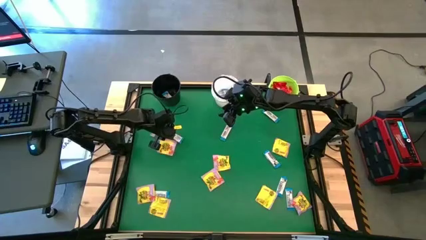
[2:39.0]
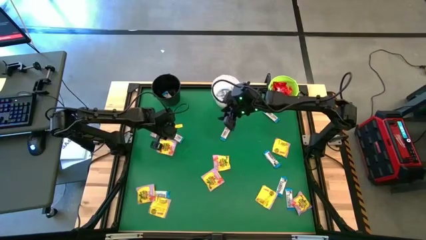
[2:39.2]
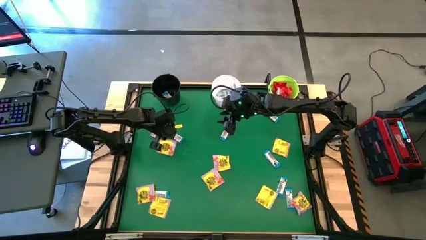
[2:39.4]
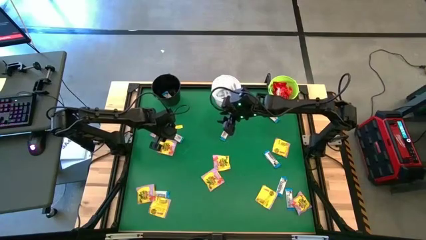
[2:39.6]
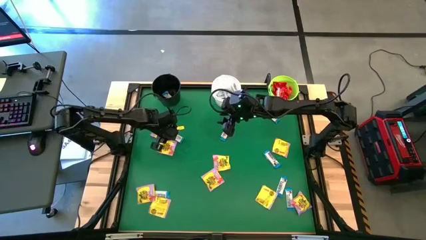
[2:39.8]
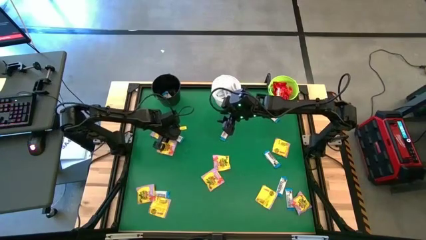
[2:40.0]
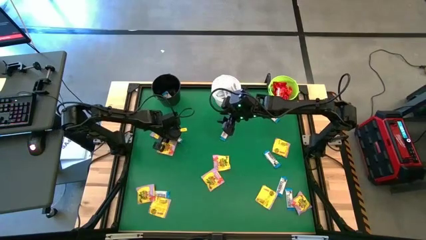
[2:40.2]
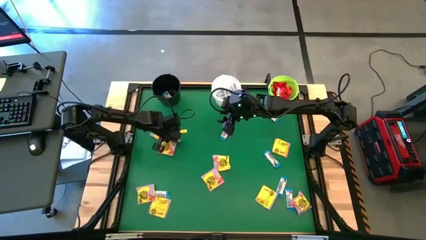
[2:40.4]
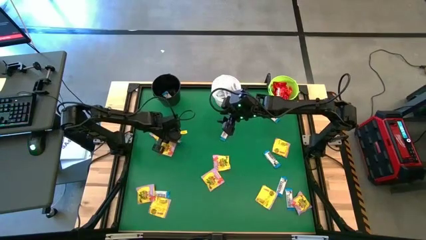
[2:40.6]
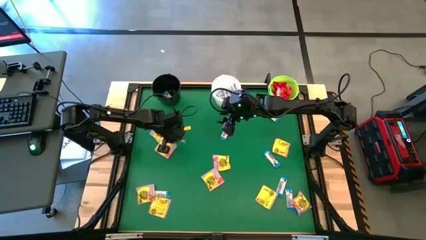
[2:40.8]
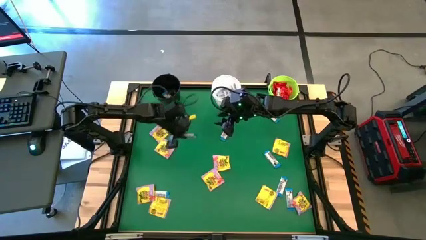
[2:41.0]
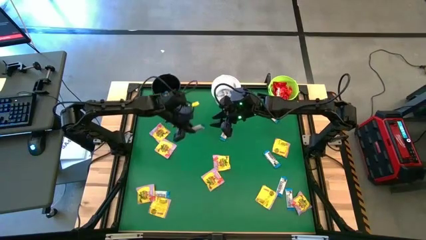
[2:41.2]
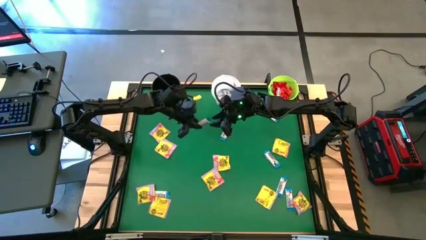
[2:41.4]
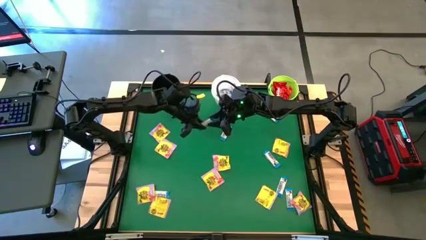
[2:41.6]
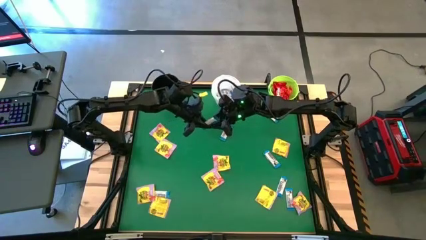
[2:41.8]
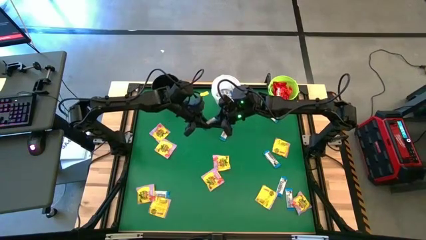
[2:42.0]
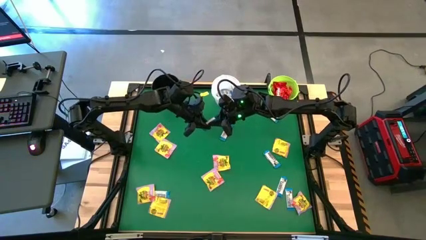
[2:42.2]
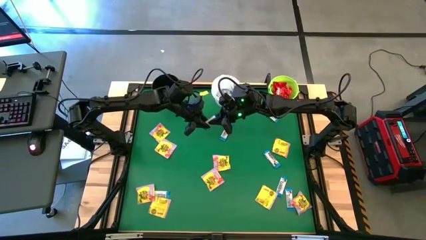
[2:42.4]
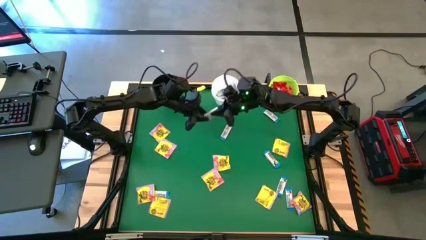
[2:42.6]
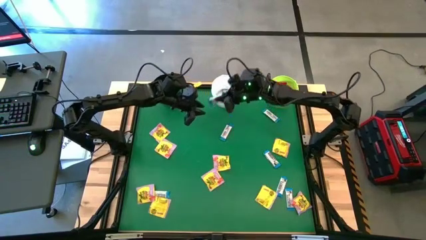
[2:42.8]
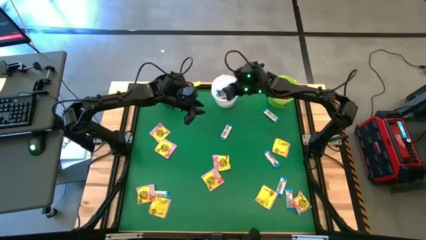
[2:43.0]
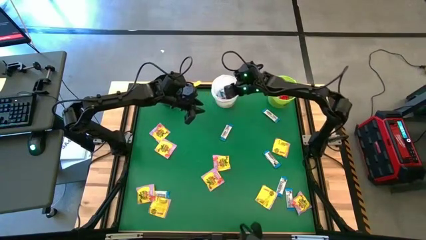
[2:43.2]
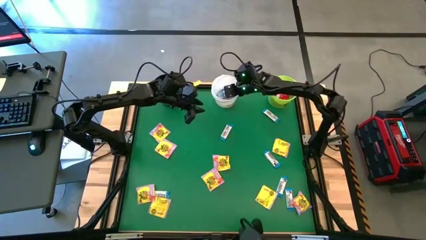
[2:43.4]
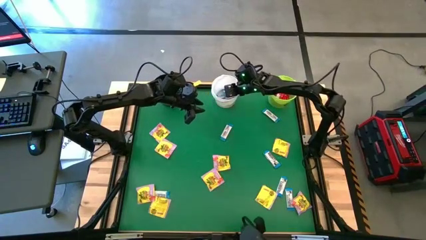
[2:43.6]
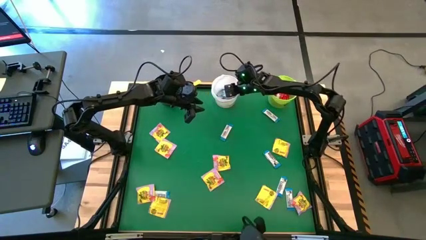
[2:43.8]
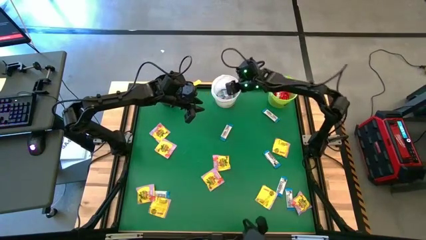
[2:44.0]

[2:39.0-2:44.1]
Task: Sort candy by brand, put in halloween buckets
Put the white candy into the white bucket

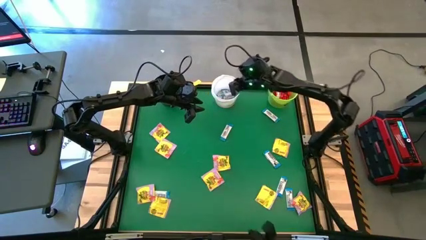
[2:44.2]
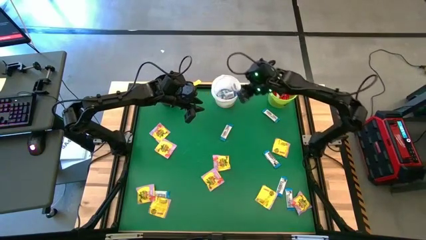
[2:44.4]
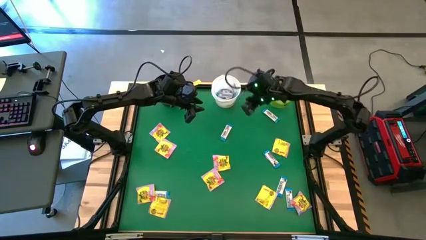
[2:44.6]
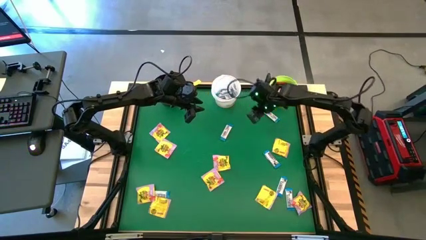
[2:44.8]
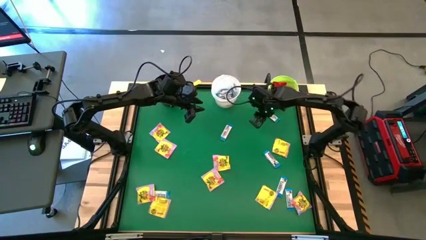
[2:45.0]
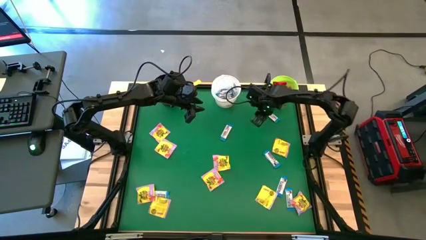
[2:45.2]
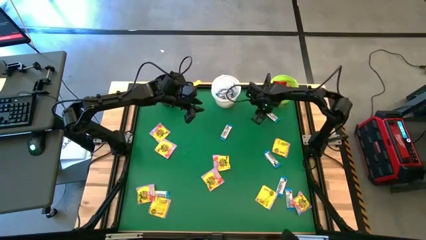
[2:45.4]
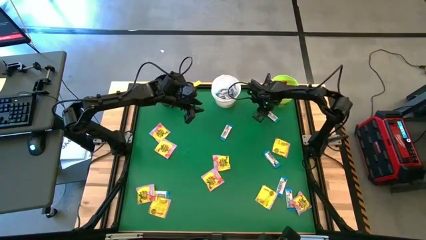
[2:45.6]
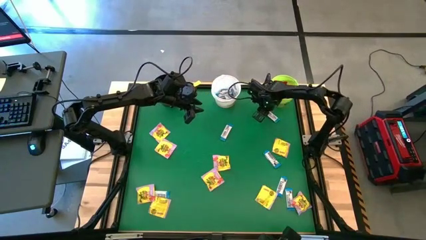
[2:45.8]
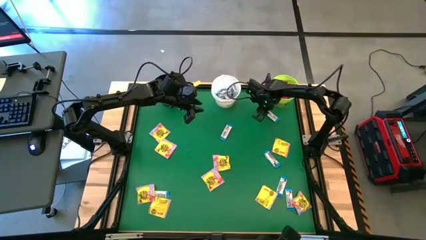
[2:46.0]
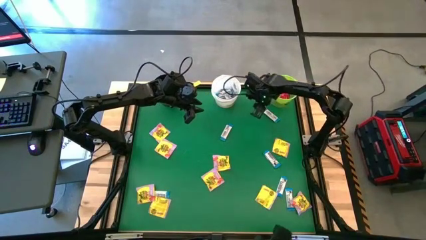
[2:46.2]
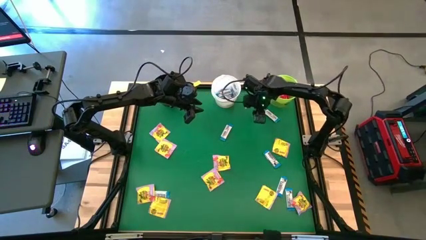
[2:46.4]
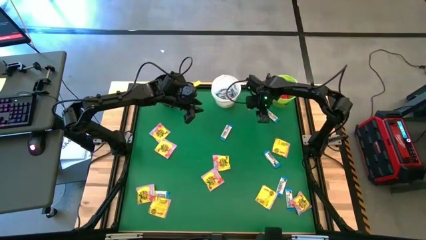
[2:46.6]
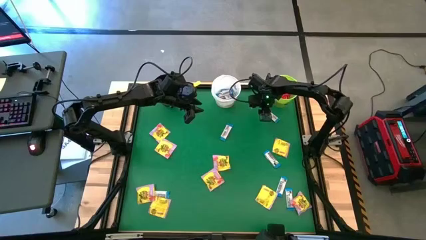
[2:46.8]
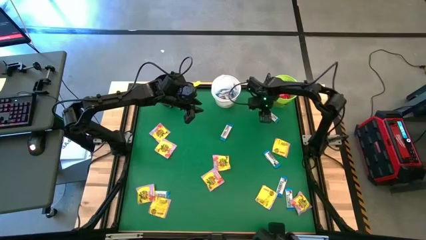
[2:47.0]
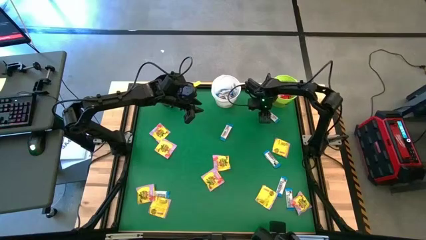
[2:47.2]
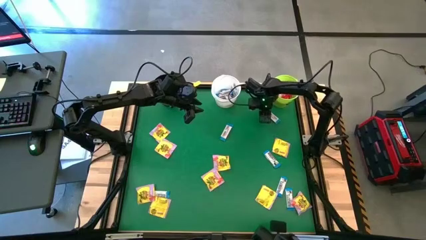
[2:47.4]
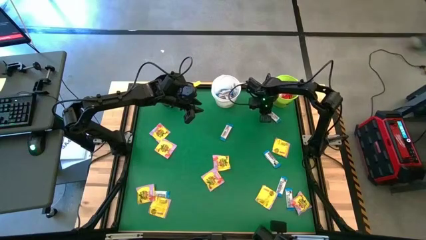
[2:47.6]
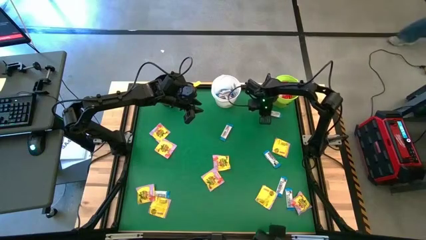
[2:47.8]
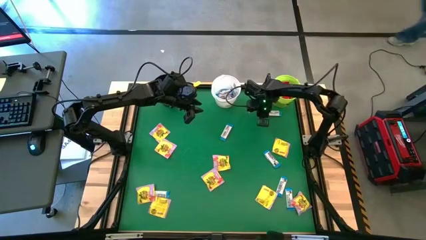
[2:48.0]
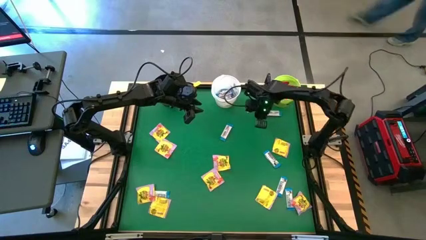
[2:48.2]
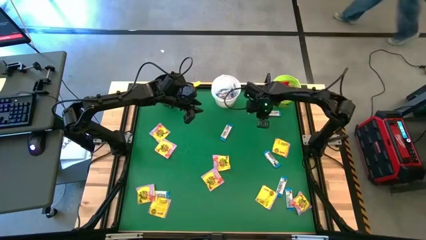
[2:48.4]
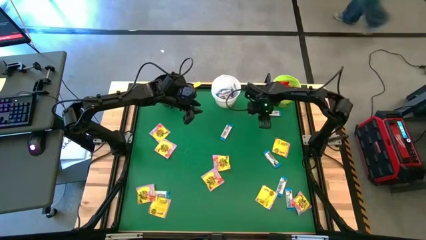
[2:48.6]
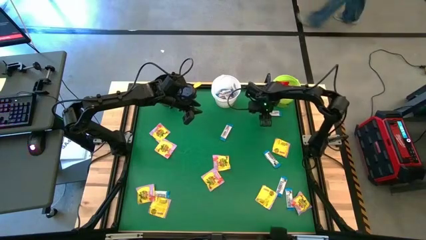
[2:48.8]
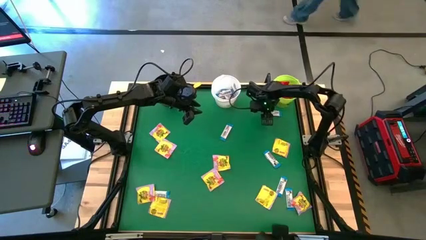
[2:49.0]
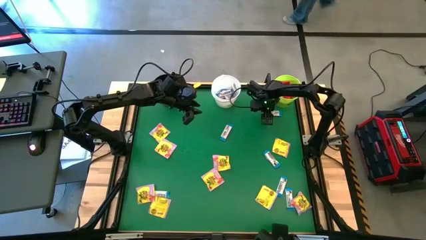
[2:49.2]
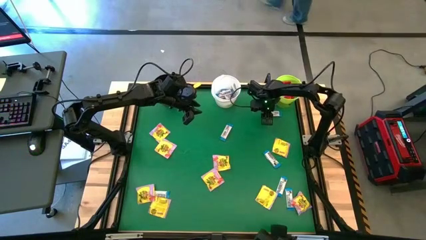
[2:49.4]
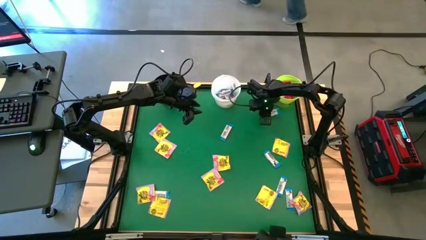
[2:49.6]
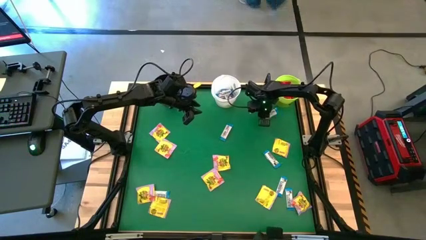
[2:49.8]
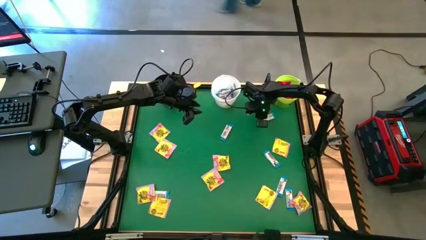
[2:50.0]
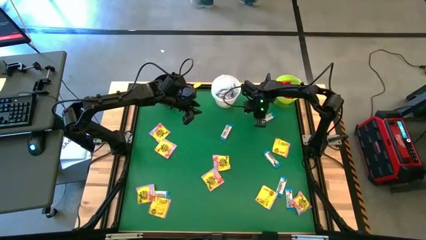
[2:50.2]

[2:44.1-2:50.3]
Put the white candy into the white bucket

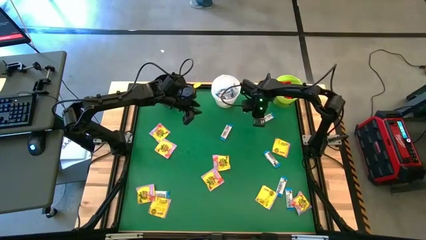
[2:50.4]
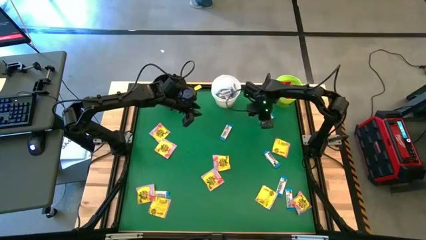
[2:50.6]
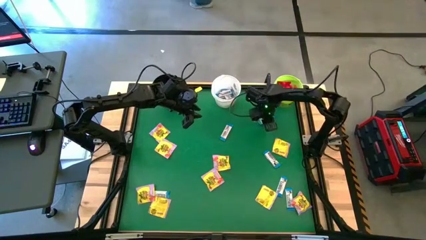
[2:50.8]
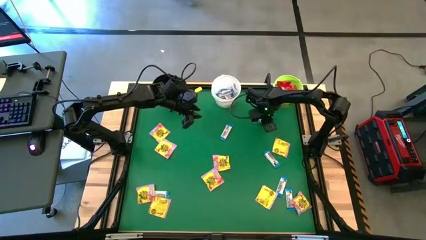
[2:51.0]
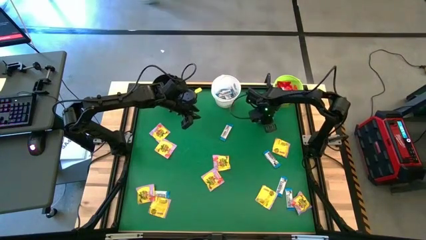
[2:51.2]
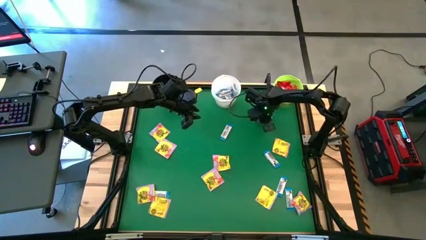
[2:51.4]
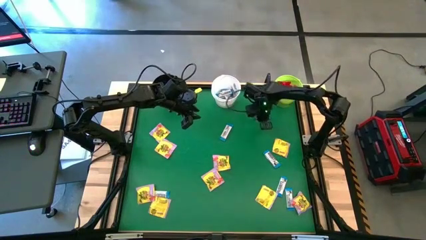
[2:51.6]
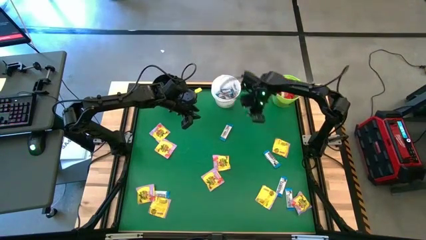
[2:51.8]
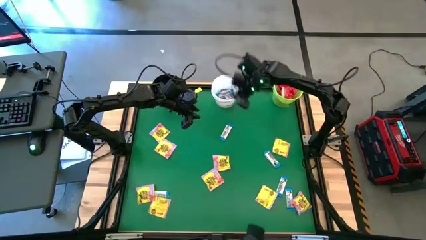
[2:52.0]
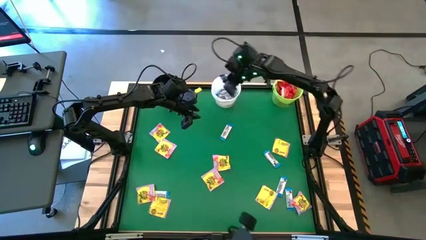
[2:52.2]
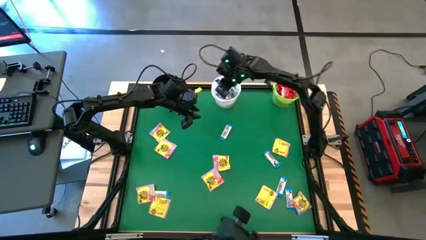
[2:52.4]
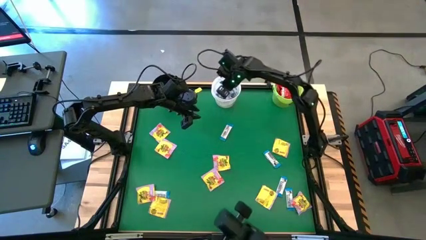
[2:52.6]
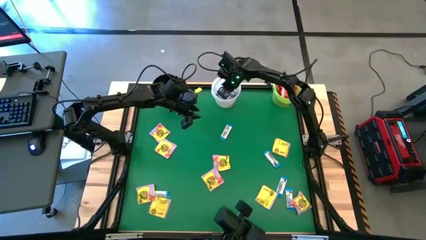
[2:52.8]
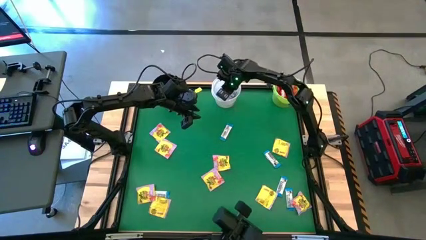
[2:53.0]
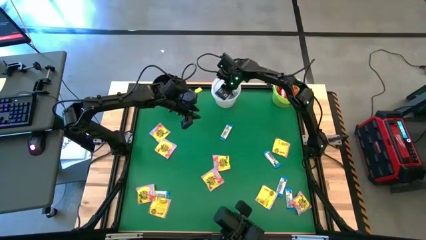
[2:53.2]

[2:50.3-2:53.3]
Put the white candy into the white bucket

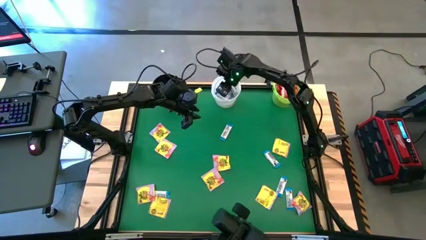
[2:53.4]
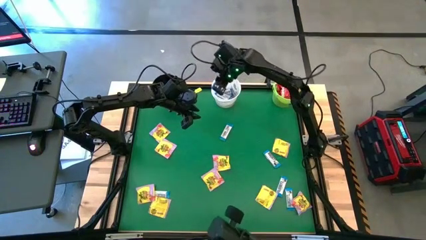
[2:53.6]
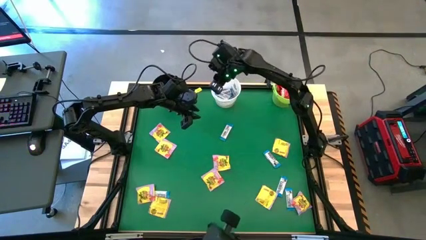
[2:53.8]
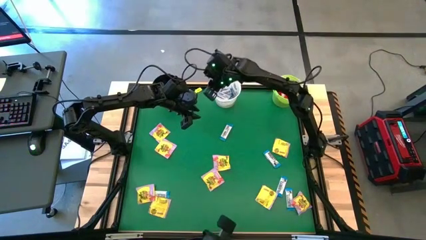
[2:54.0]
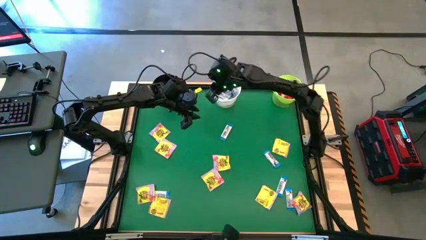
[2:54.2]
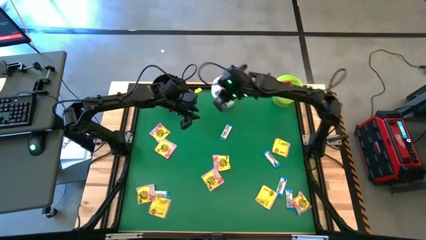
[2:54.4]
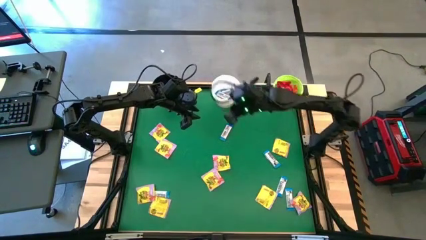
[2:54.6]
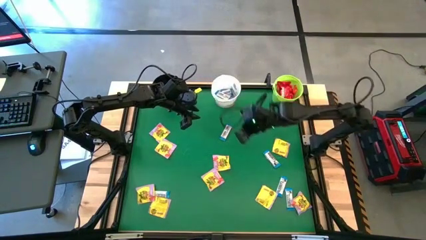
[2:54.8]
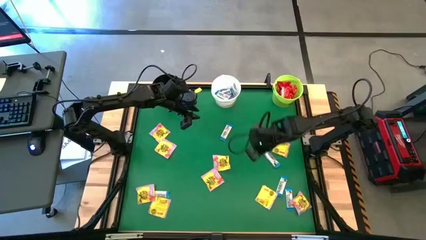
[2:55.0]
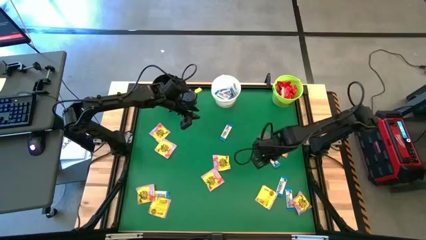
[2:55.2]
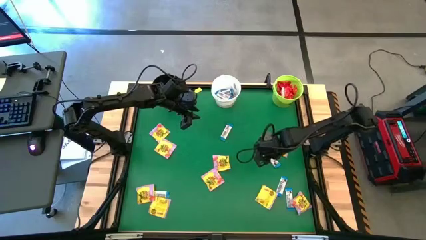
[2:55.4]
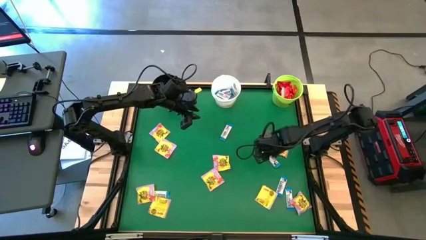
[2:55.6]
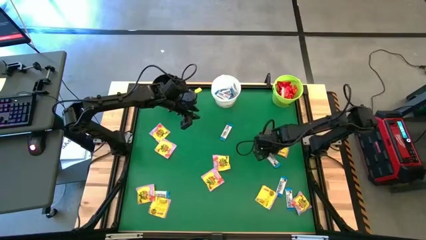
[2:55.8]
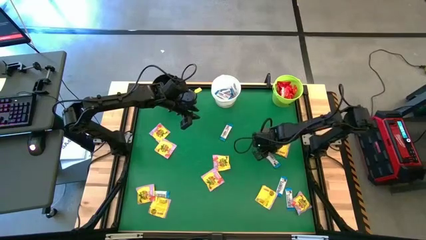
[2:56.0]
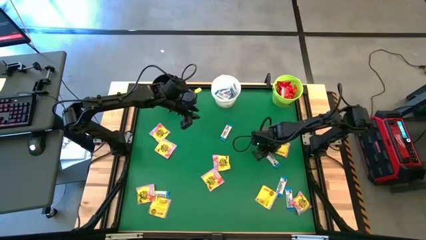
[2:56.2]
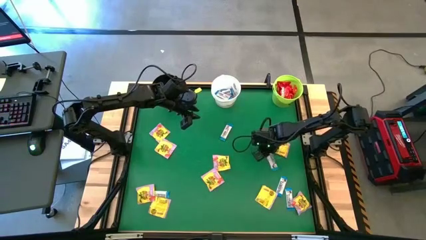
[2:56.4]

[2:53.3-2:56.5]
Put the white candy into the white bucket
